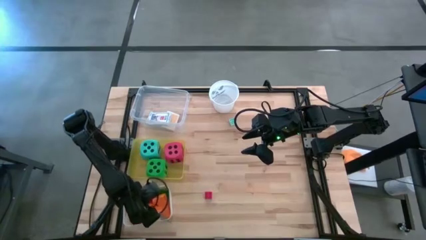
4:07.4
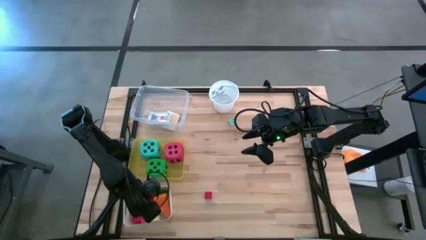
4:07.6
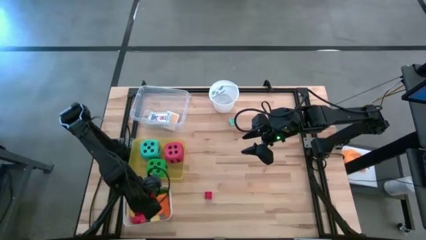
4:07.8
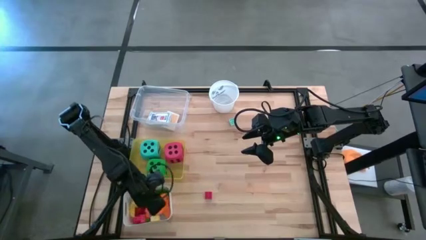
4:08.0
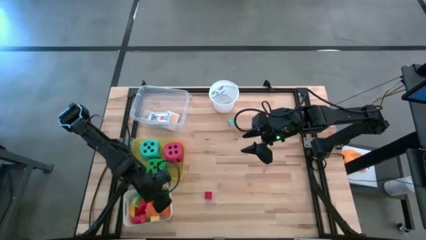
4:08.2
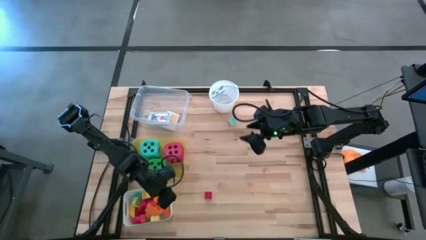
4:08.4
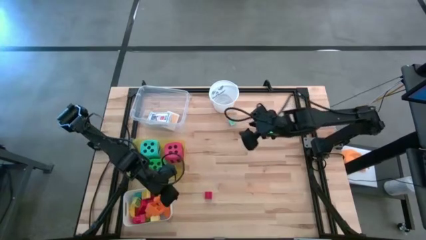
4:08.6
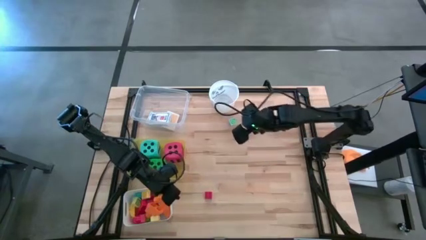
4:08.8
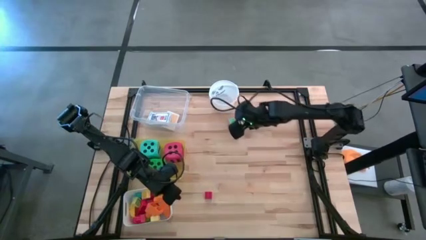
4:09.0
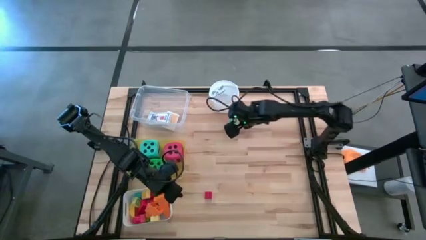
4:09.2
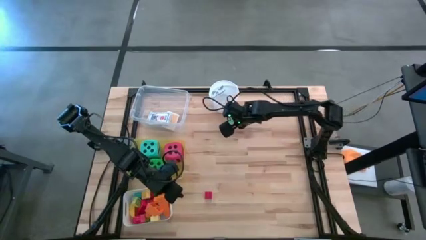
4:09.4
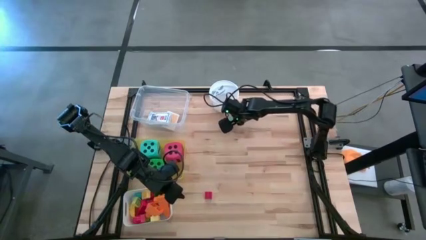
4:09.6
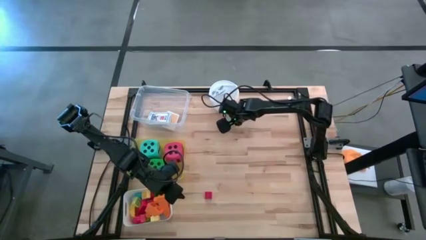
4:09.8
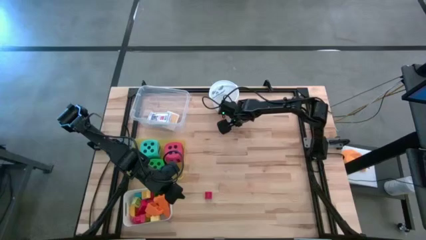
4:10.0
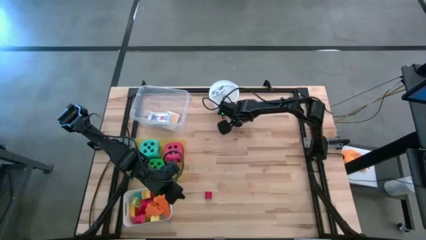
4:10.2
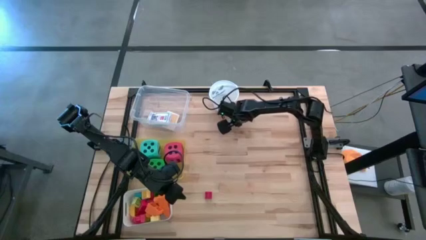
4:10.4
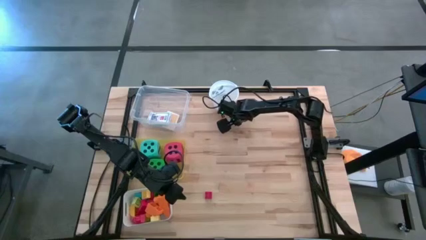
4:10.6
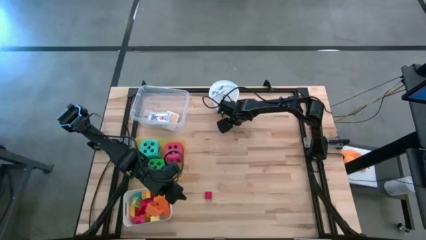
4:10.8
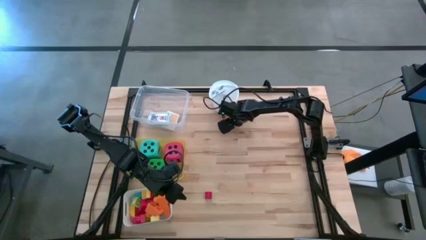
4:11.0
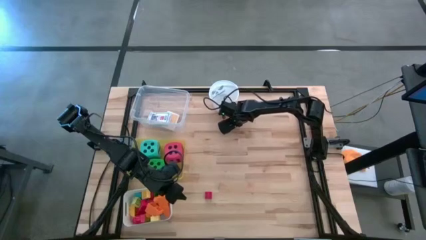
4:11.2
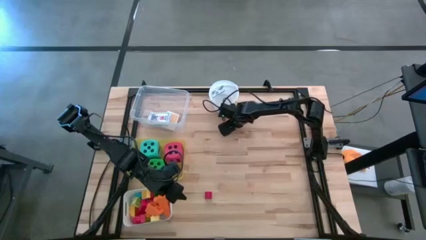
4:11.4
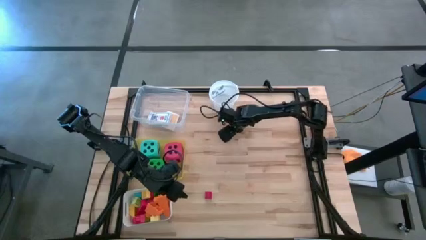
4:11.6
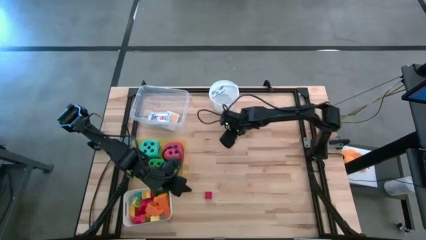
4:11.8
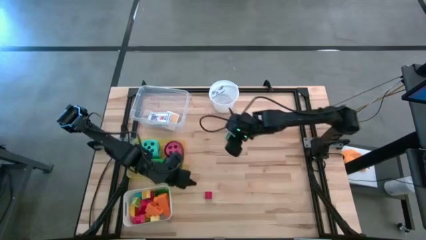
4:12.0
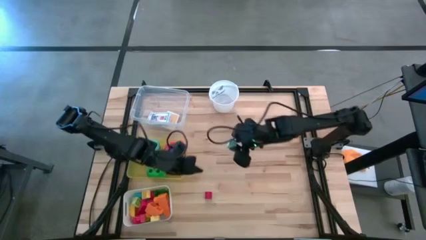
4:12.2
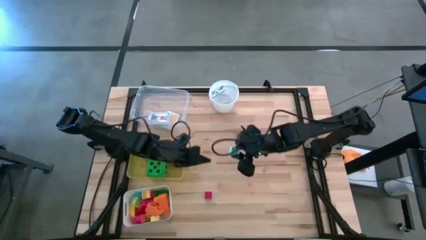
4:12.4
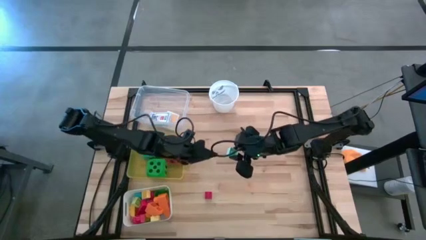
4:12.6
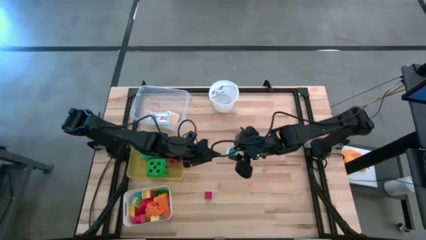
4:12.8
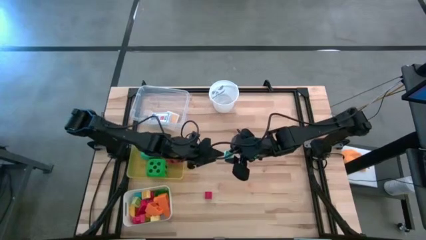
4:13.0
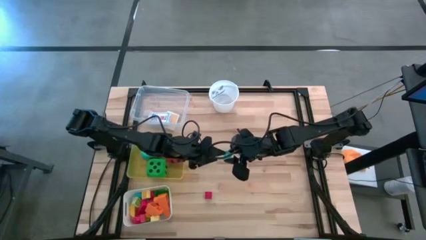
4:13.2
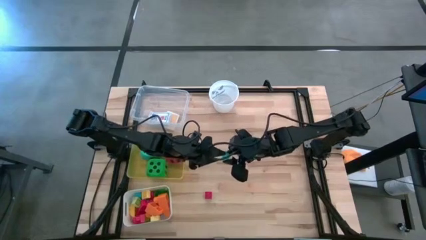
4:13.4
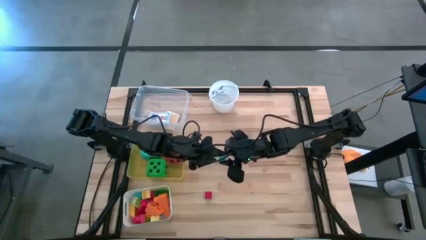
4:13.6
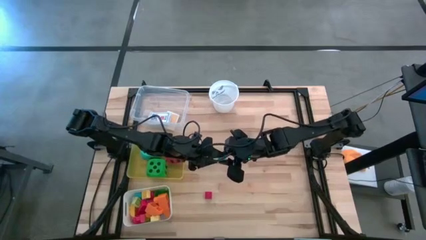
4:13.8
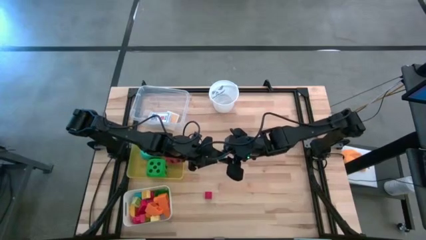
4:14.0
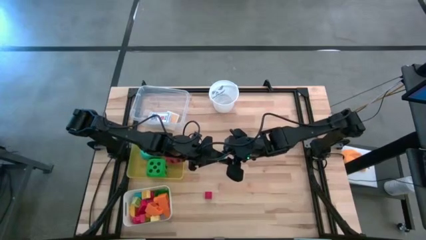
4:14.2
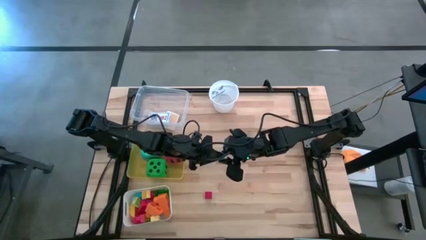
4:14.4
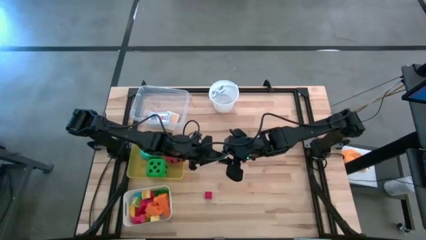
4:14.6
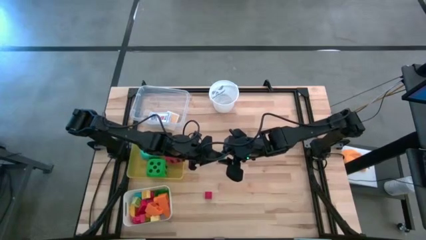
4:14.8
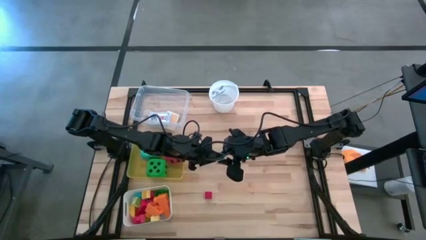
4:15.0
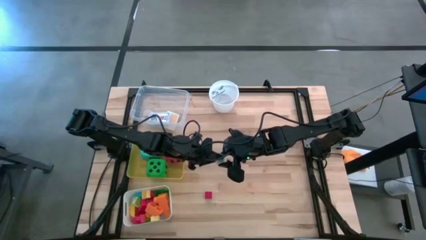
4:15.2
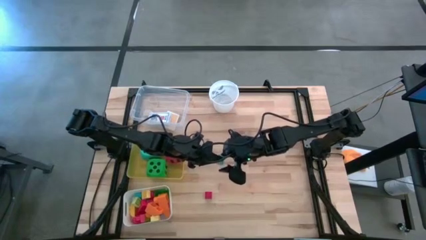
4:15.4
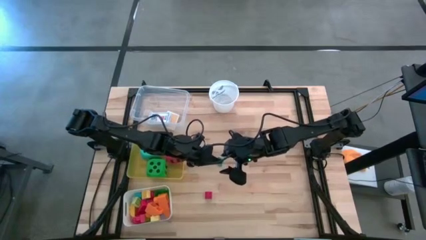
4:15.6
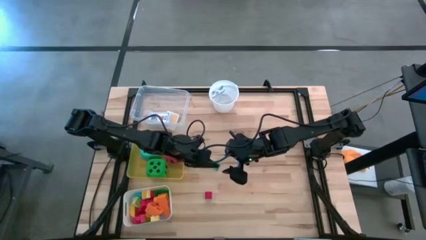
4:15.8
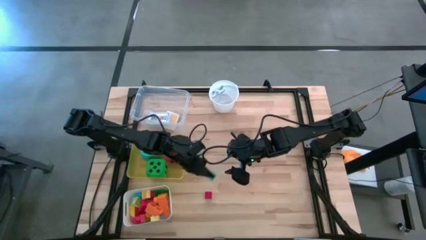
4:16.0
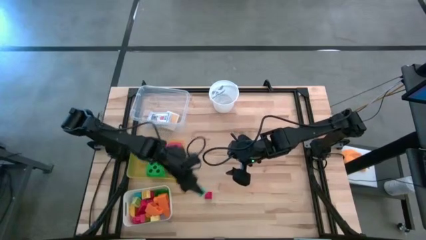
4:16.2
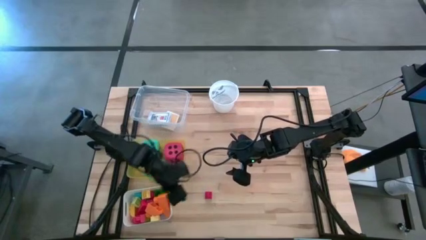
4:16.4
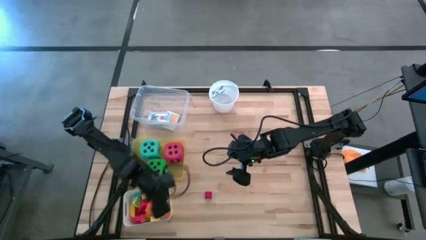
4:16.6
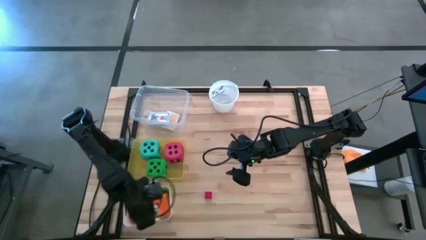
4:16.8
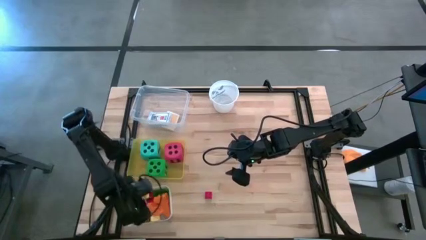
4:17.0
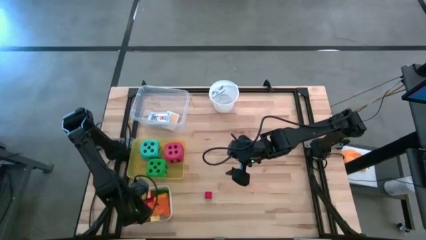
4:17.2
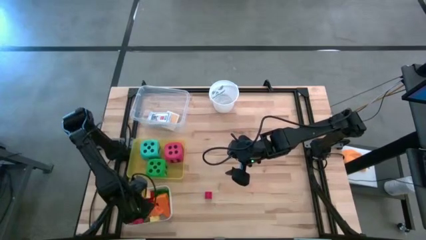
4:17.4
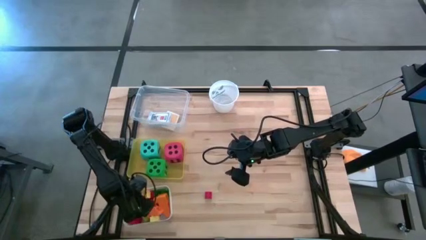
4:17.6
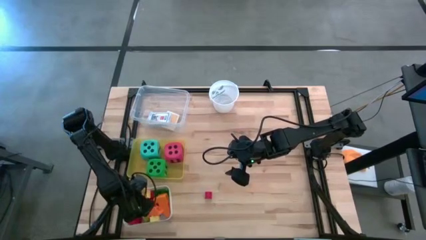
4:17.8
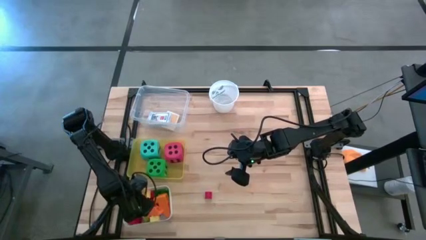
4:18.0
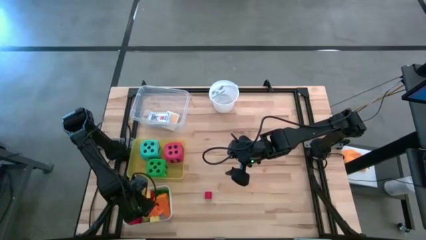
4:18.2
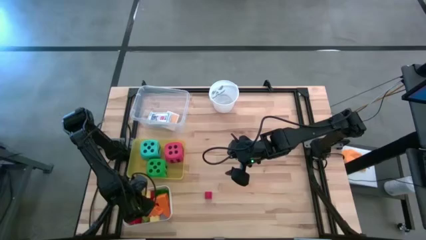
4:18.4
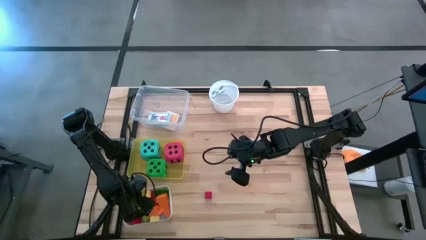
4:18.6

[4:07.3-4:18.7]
Task: Pick & Place Toys
Put the light blue game piece into the white bin

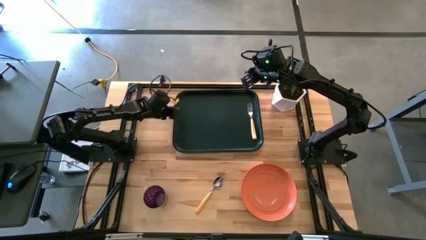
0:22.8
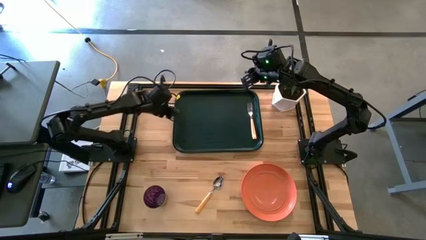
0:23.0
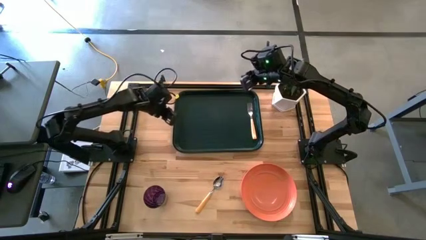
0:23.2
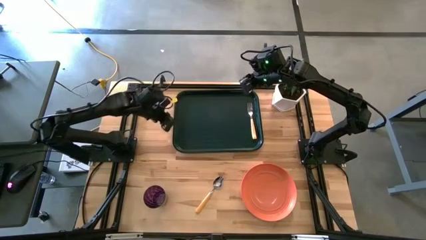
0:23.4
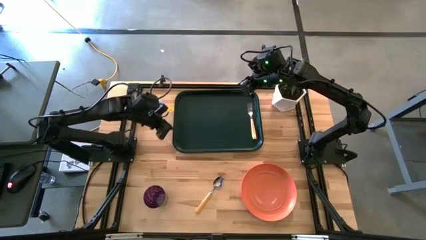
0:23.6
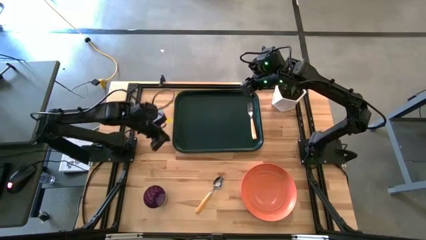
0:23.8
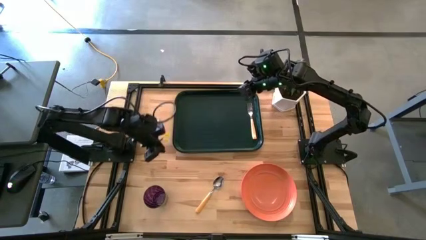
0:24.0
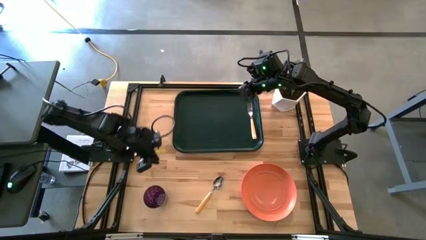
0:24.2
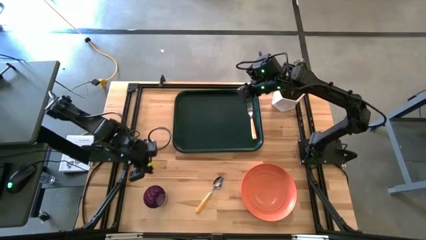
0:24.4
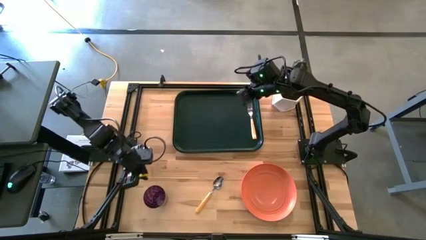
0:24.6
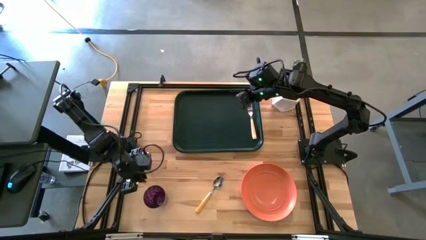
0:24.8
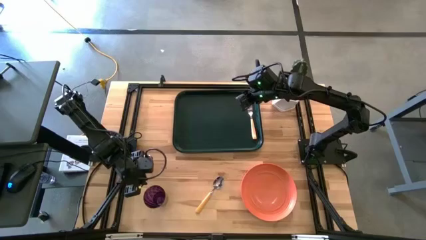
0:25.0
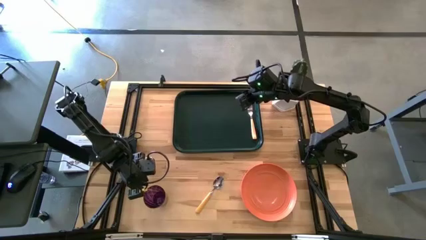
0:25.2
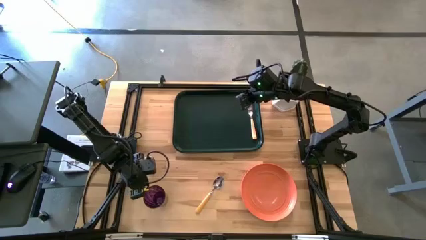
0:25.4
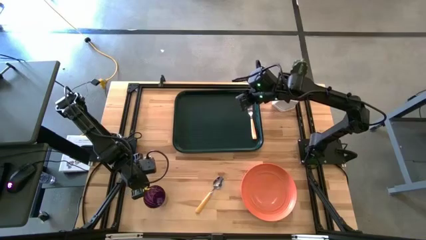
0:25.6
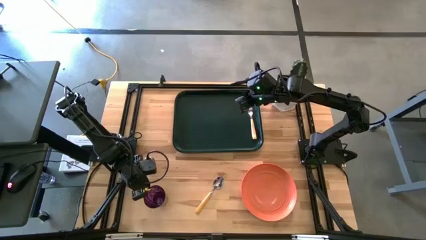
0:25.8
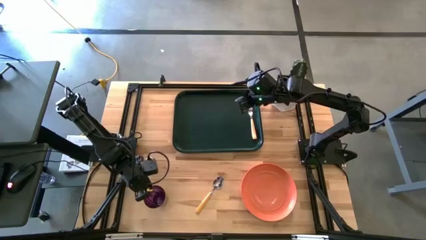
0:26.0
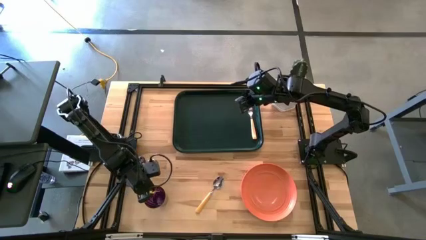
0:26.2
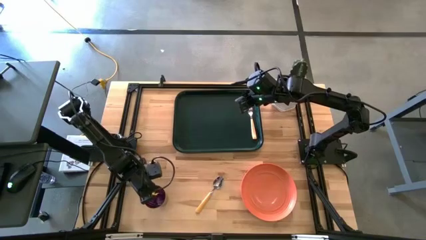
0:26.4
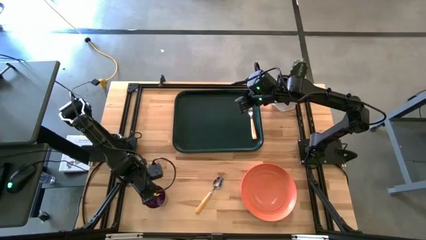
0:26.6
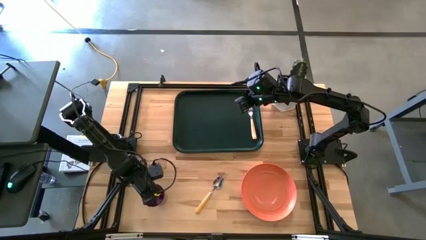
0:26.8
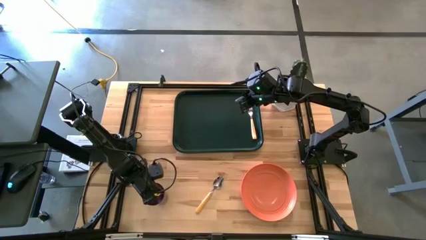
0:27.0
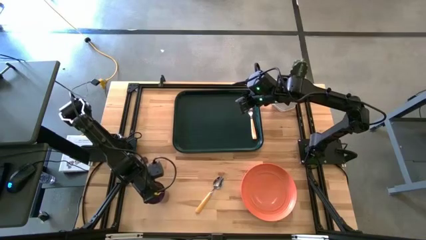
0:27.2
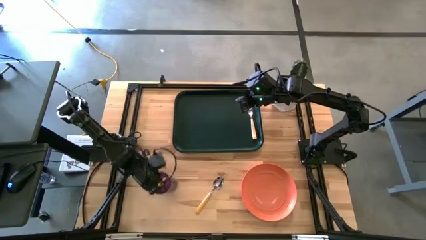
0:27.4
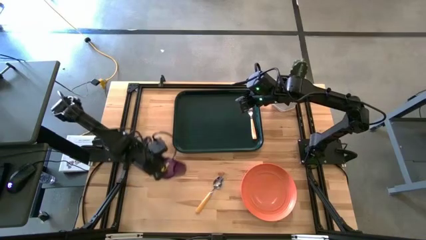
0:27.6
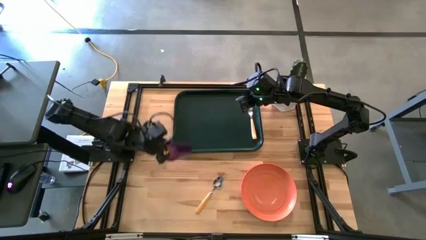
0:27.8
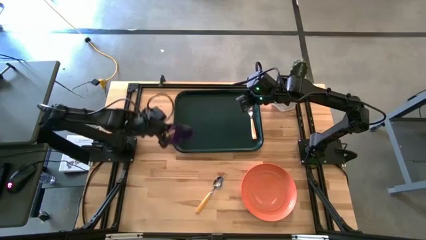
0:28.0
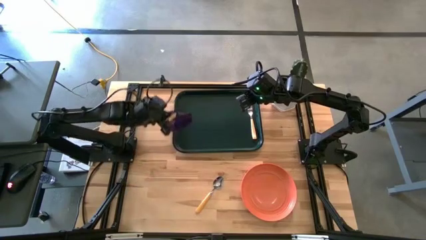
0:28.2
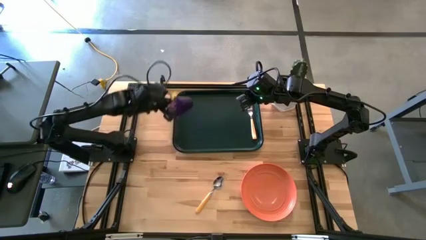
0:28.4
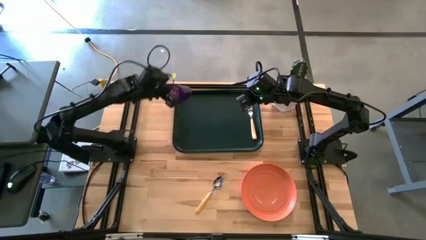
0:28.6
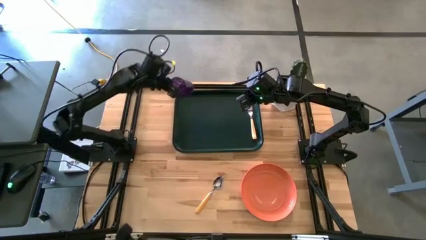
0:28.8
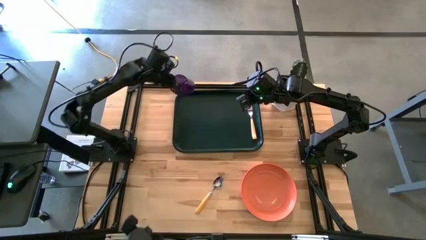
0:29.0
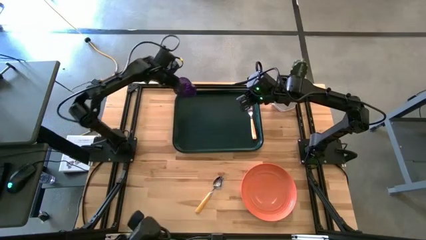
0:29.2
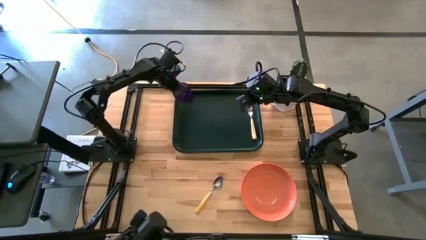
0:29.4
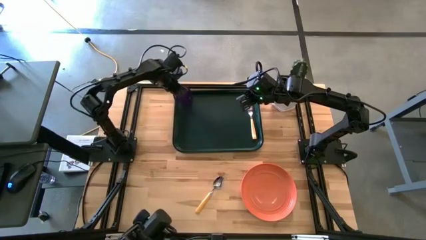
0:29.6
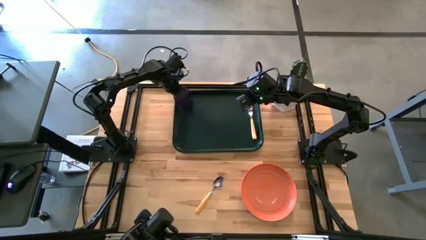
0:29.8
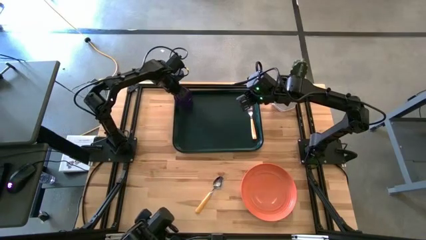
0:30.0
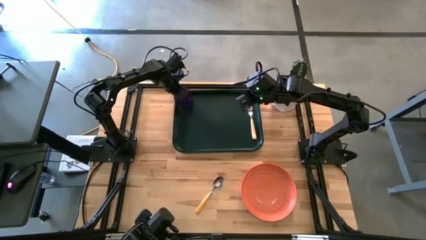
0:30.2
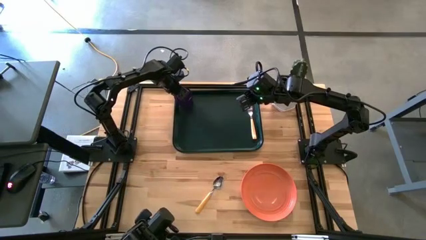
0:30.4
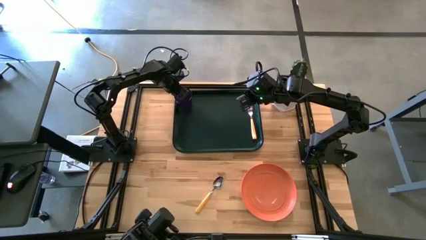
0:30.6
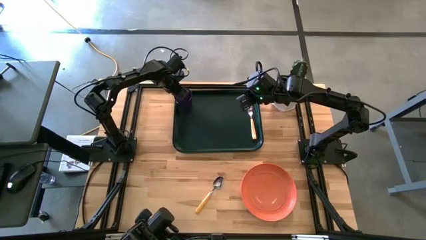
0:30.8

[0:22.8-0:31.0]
Task: Pick and place plate/cup/fork/spoon on tray
Put the purple cup on the top left of the black tray
